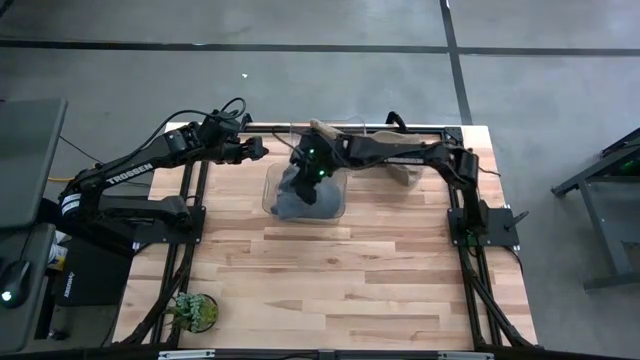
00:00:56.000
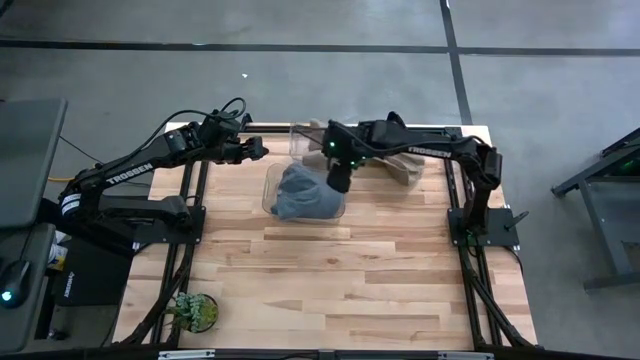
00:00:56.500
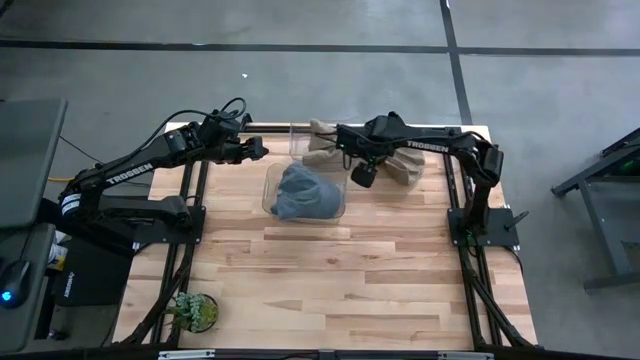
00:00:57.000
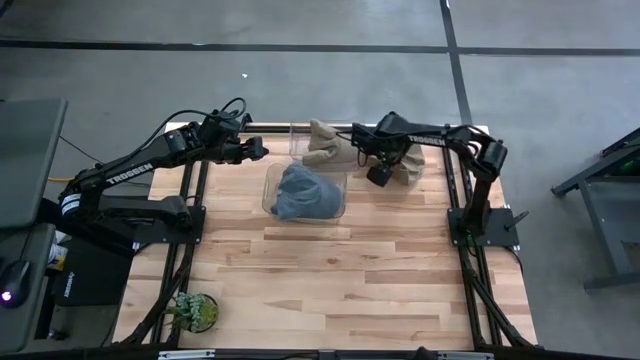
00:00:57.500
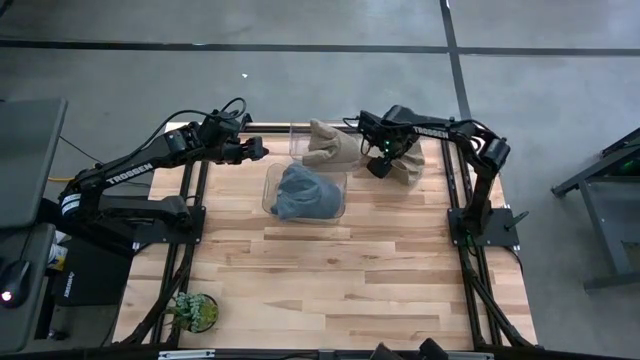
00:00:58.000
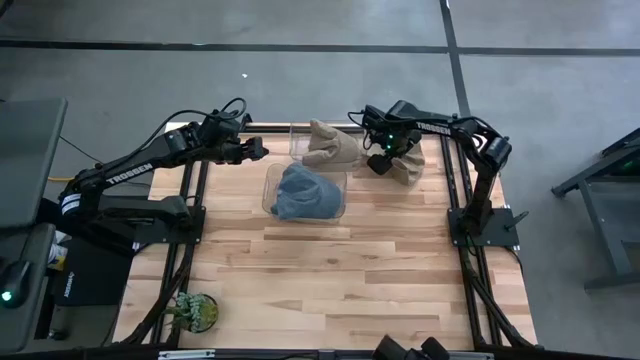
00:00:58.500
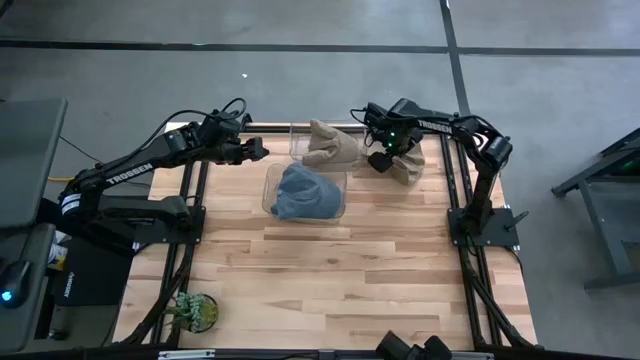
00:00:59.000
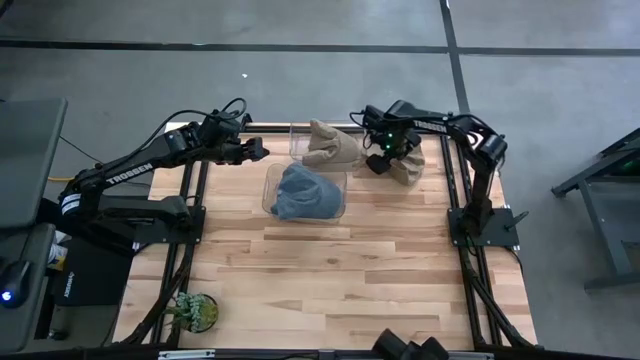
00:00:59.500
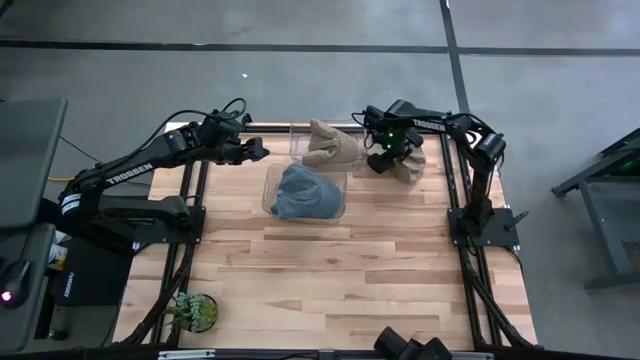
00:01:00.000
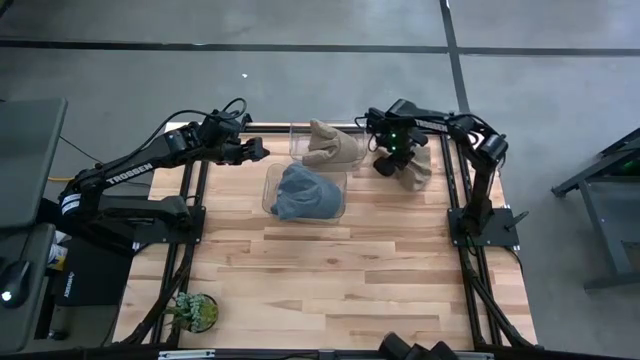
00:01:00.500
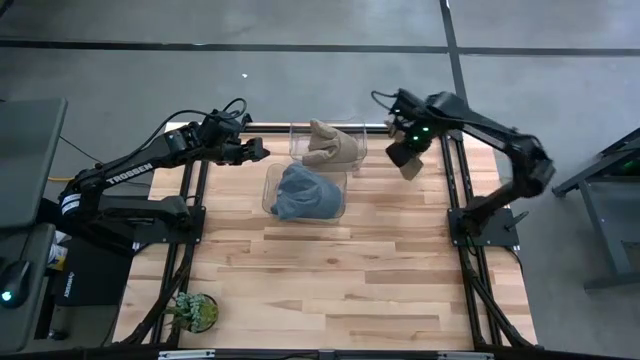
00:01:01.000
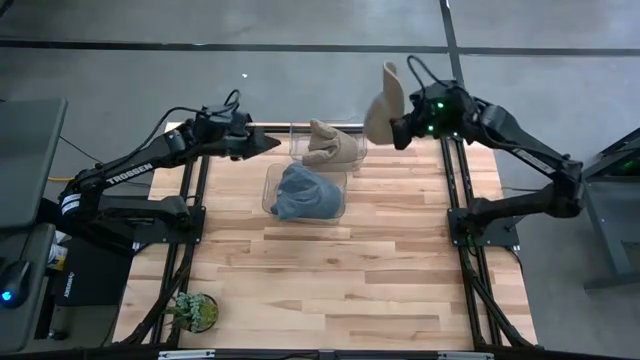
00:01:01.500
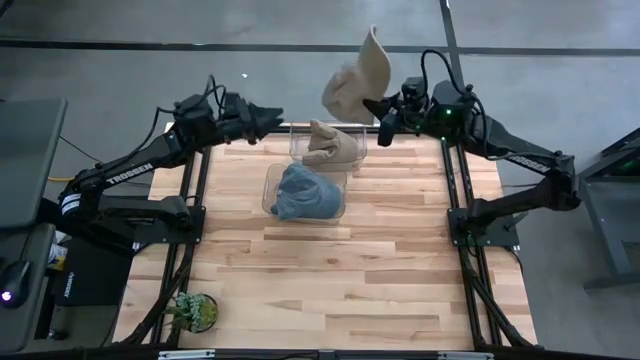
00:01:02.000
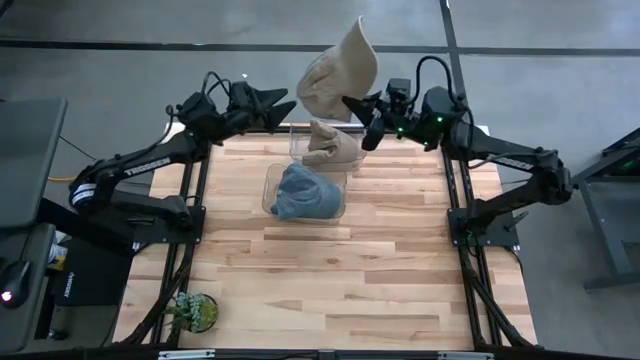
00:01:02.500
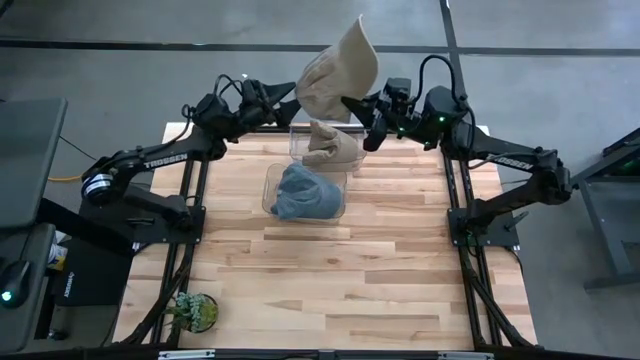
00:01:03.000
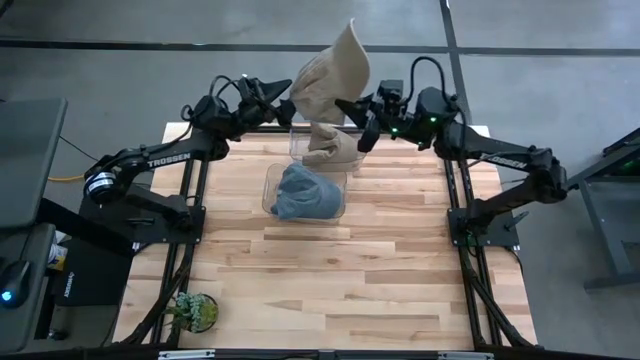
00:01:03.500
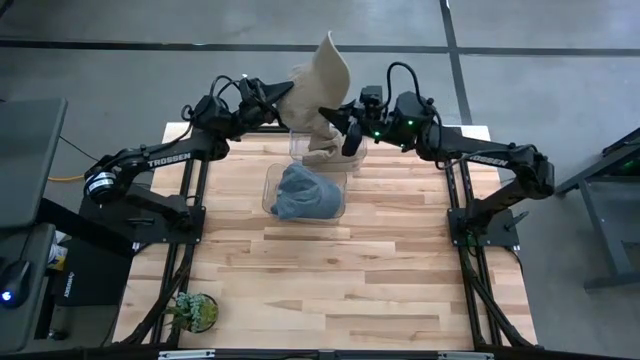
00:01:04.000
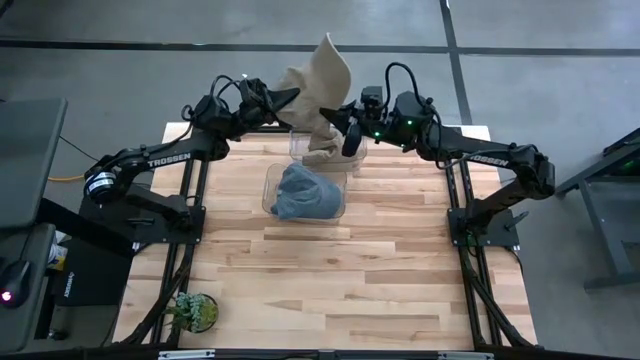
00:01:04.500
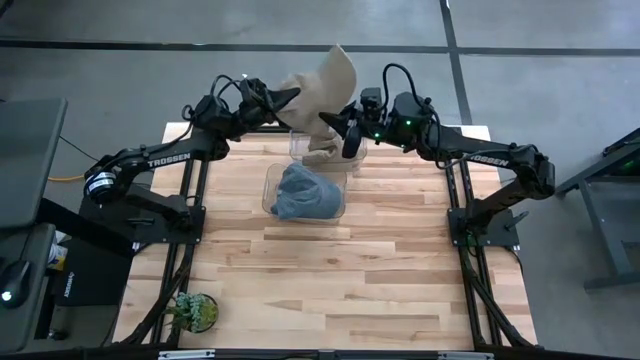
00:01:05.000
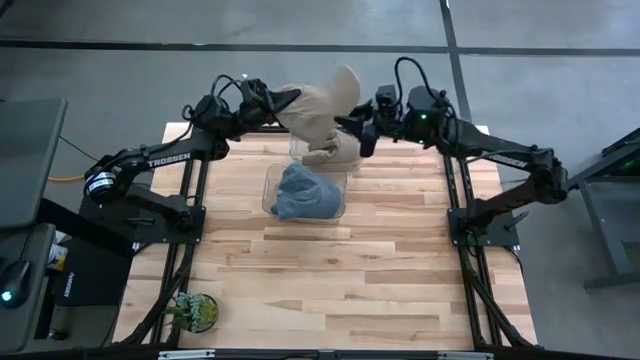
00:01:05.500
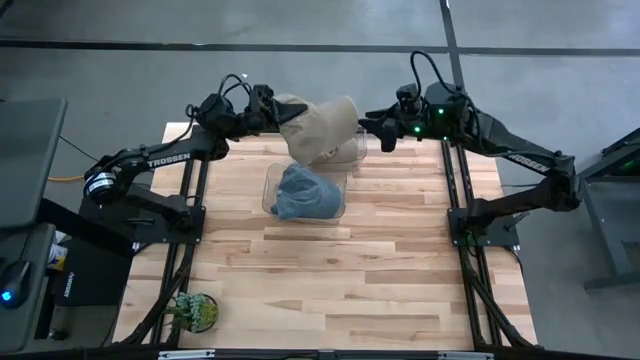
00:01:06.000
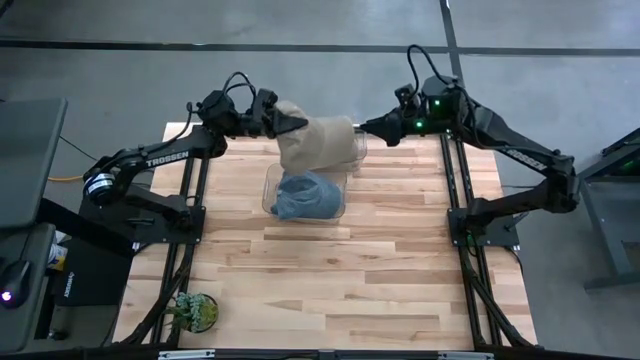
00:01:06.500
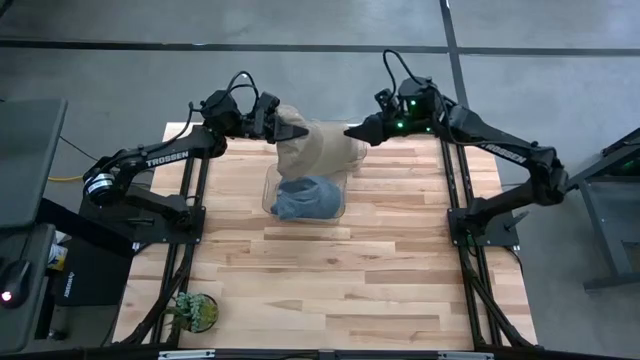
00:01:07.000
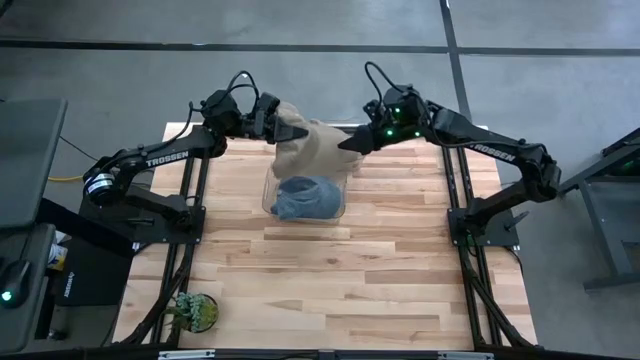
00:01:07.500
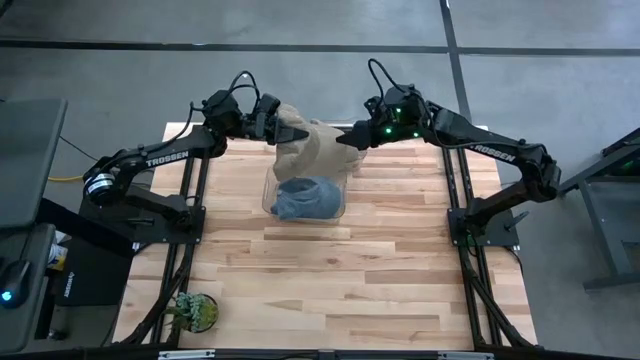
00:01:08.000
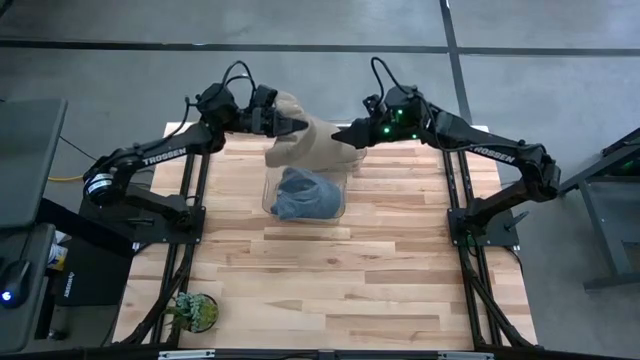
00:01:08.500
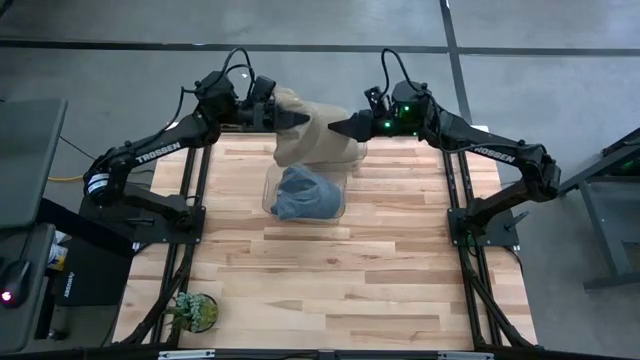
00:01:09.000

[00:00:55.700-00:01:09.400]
Task: Pick & Place hat
Put the brown cap into the top transparent bin

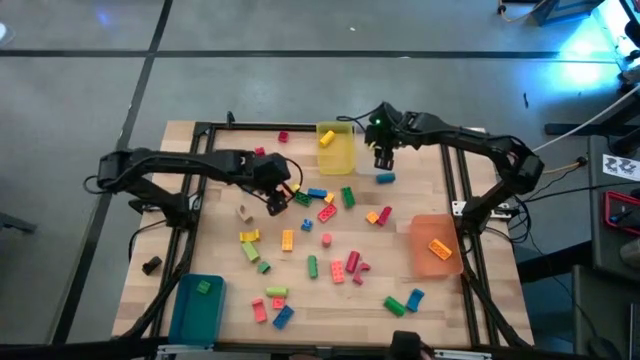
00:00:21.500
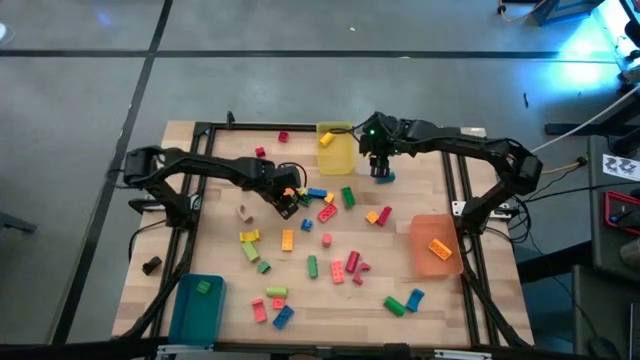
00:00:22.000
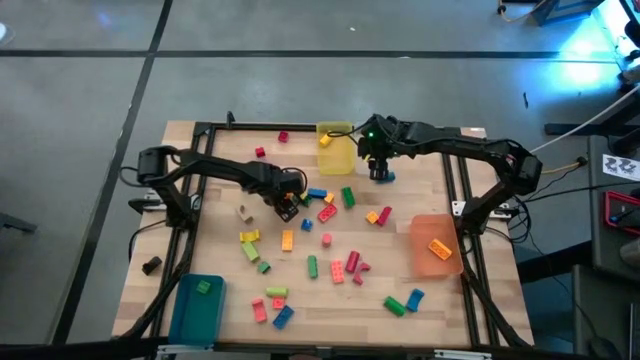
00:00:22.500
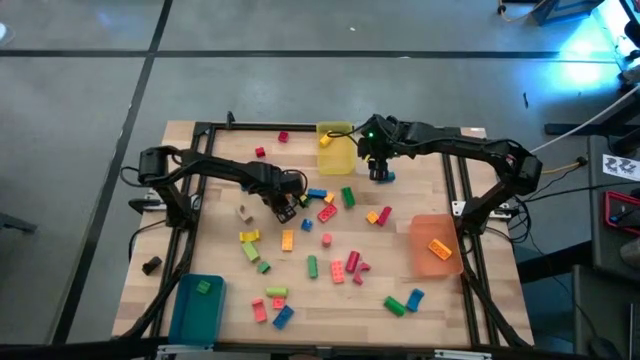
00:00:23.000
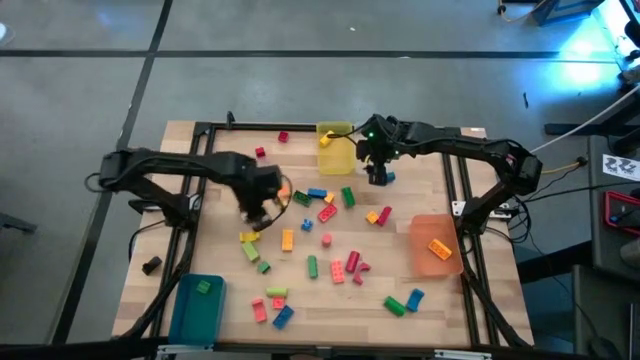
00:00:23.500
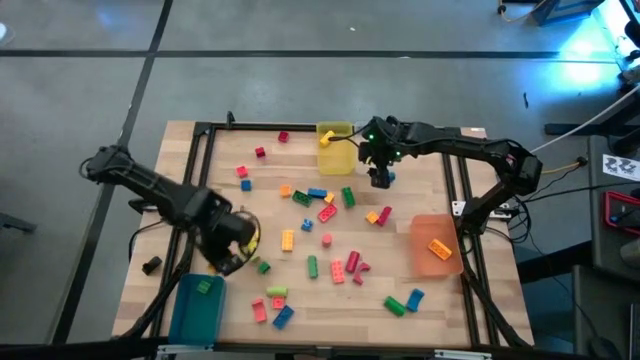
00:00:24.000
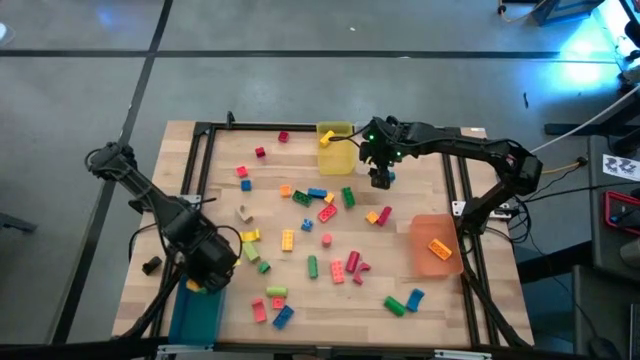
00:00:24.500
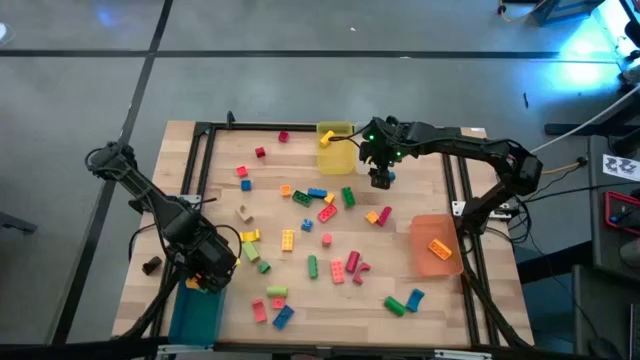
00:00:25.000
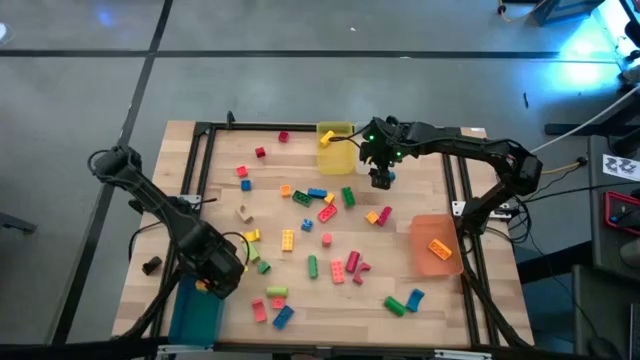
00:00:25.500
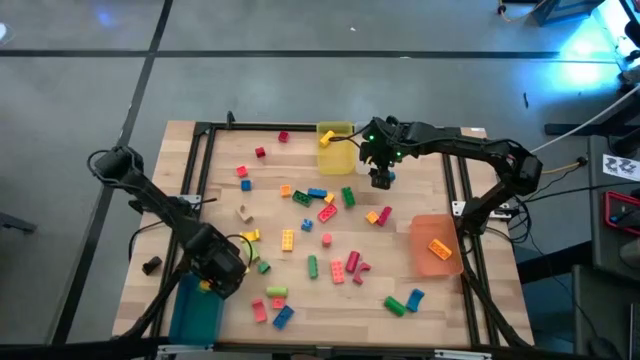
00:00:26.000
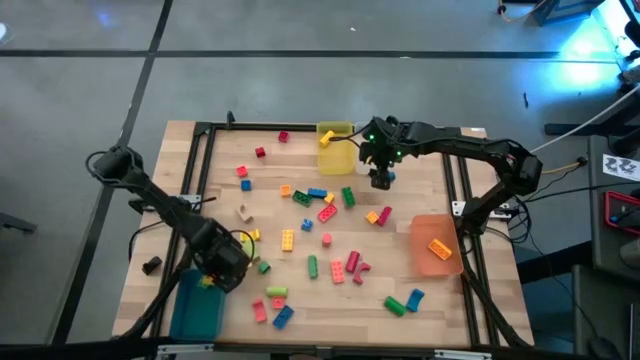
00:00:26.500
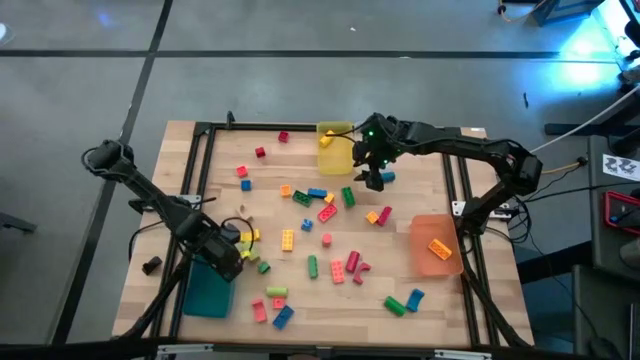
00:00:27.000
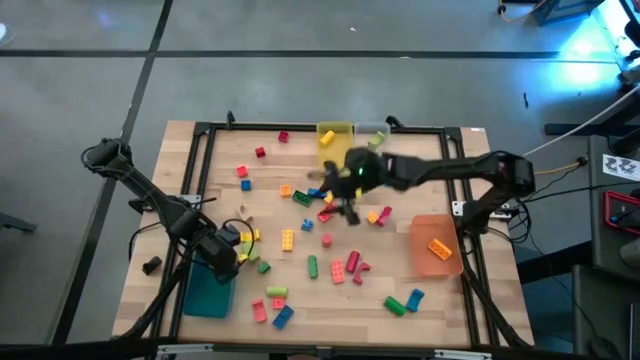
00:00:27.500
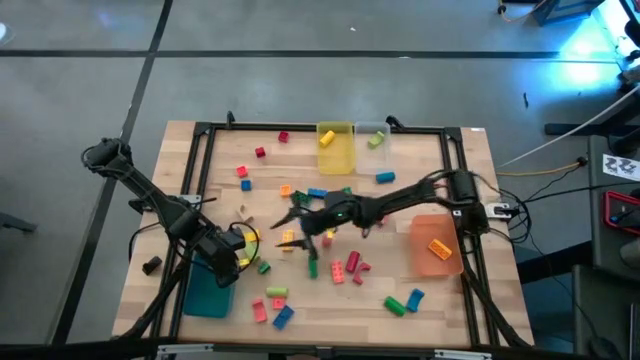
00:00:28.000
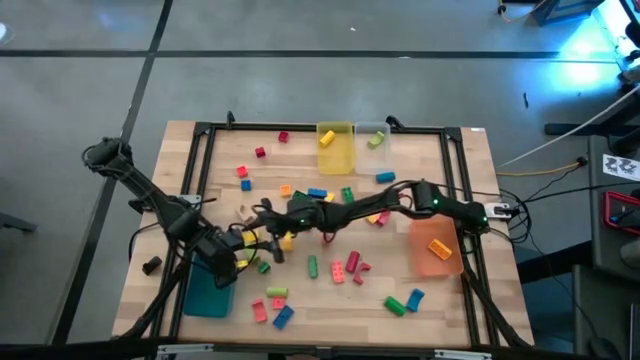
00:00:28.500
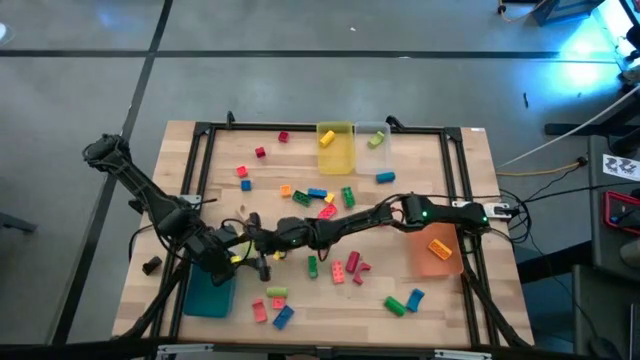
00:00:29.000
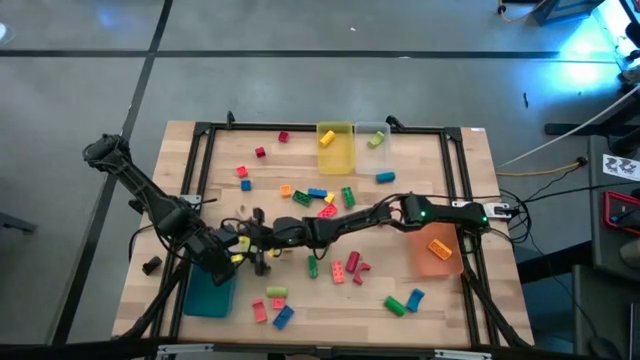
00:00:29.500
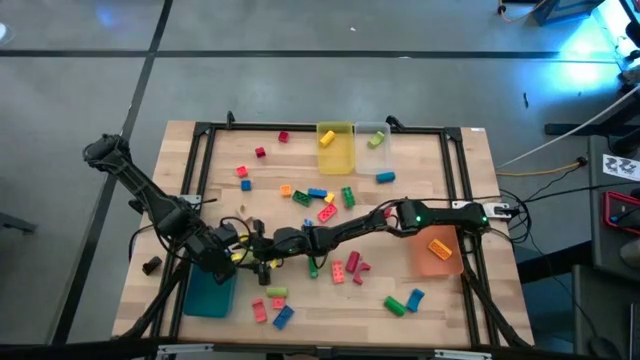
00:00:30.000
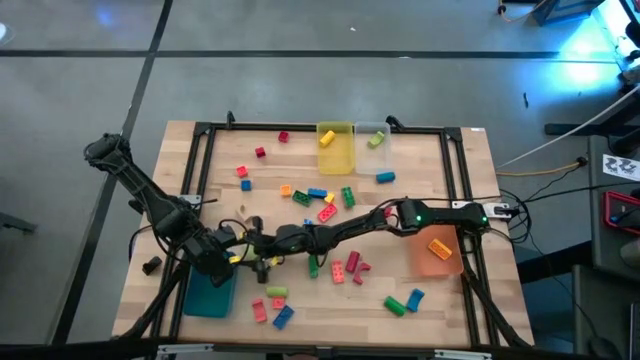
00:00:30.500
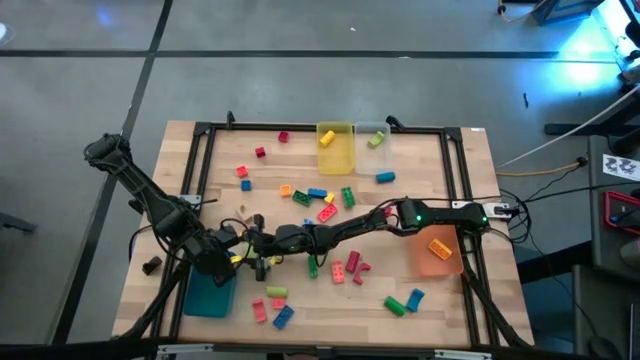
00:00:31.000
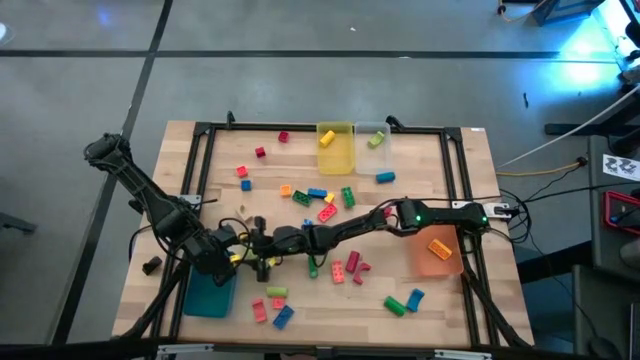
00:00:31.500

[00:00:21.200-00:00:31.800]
Task: Sort blocks by size
Put the yellow square game piece into the blue bin
